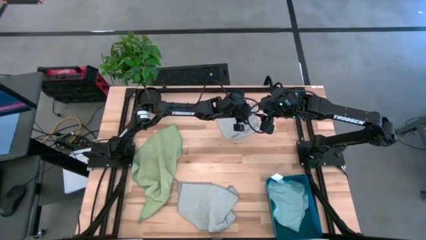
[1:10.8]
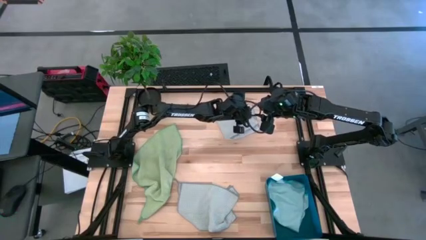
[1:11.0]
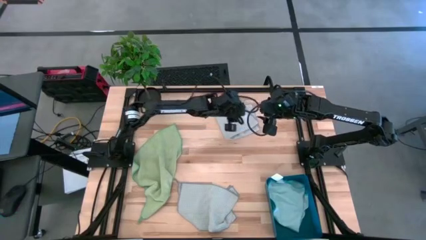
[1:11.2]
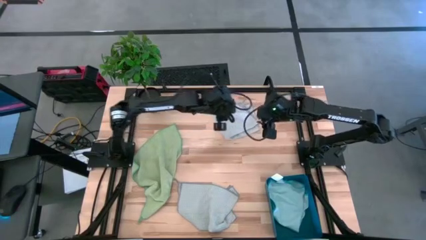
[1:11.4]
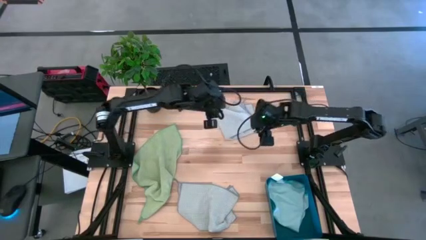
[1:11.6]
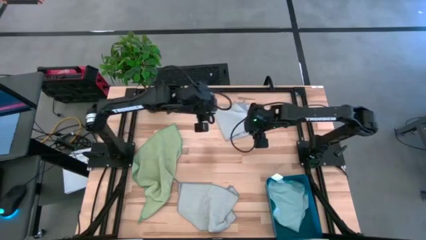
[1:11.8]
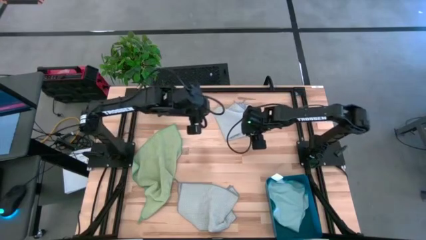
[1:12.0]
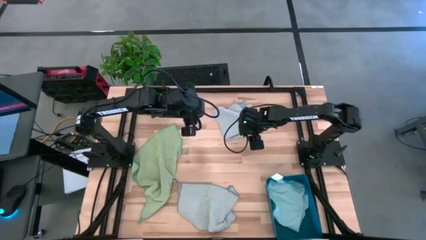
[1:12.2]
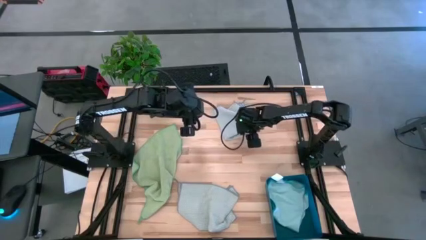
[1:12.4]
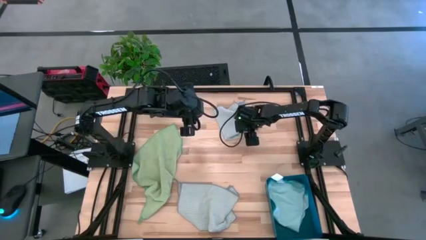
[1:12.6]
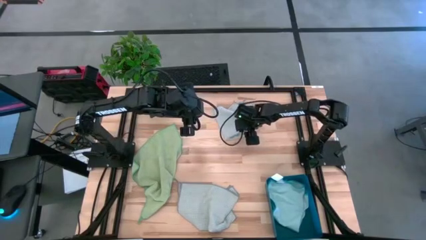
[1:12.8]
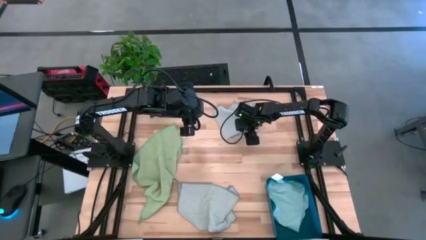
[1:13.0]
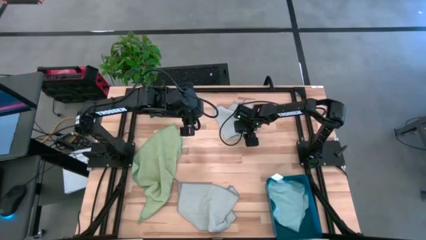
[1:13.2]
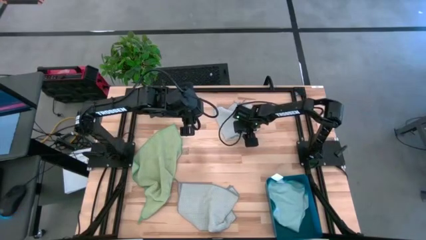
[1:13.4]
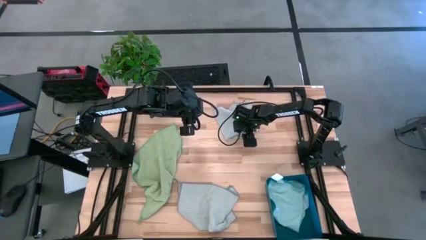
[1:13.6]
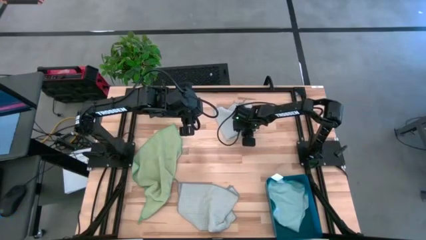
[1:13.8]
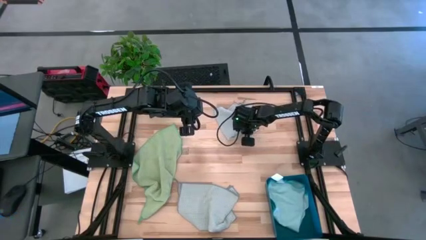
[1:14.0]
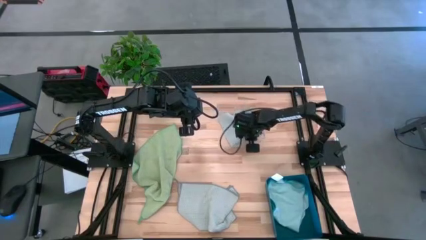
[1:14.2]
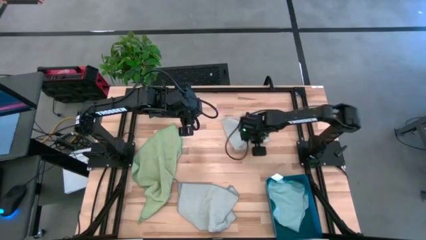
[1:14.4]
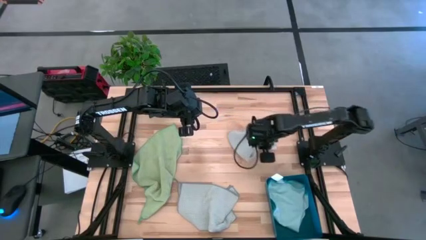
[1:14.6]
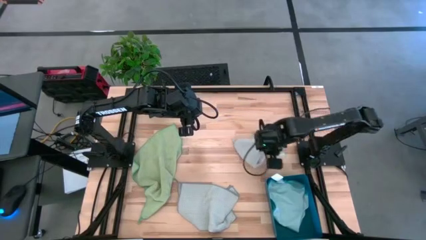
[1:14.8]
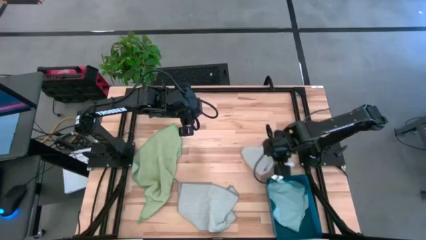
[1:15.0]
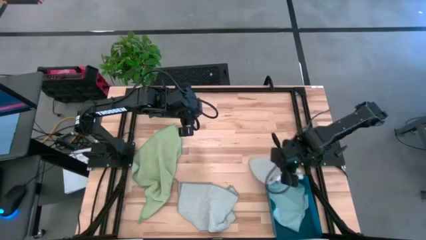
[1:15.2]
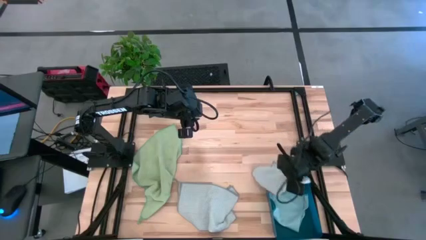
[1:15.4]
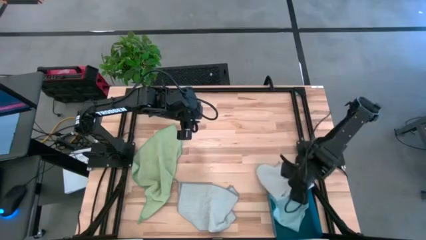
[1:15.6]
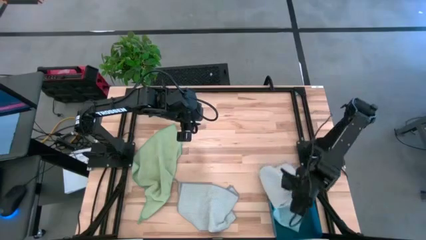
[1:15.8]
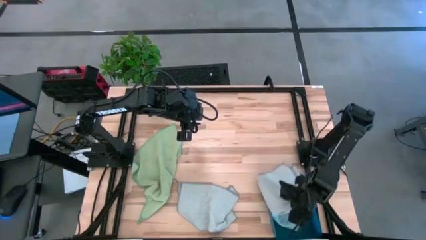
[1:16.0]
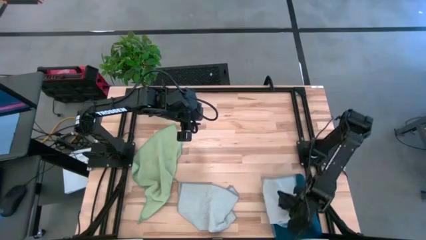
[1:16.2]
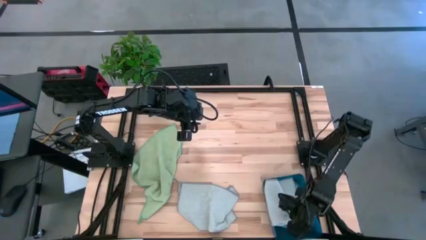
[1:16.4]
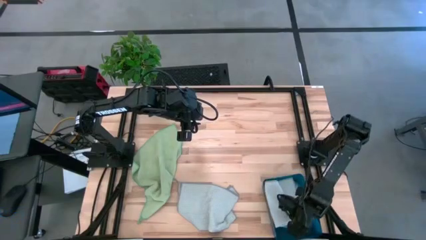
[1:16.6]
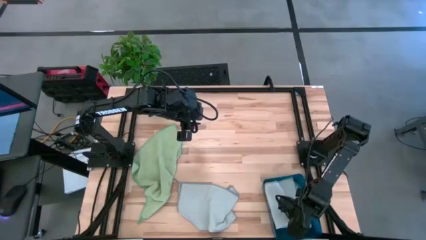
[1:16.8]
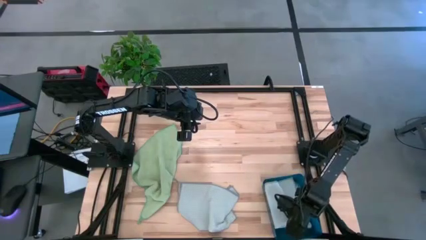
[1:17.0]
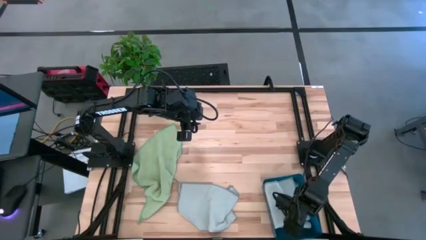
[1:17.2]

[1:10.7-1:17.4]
Task: Fold microfiber towels
Put the top gray microfiber towel into the blue bin

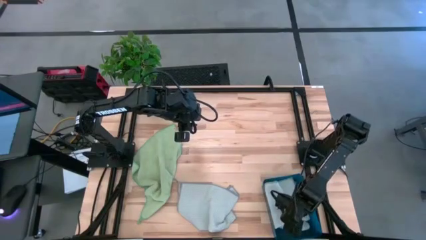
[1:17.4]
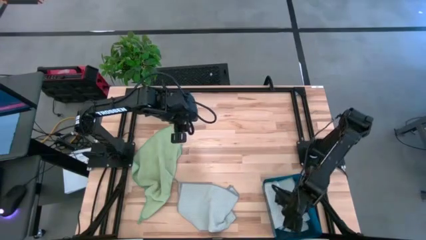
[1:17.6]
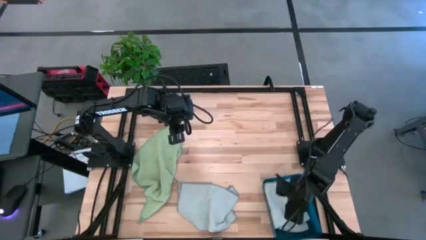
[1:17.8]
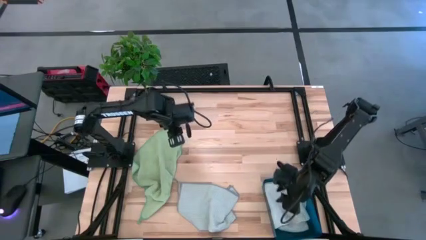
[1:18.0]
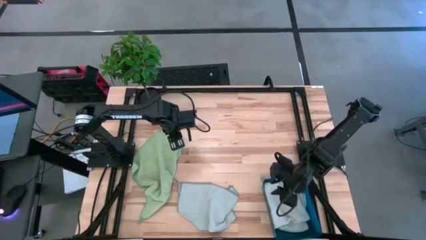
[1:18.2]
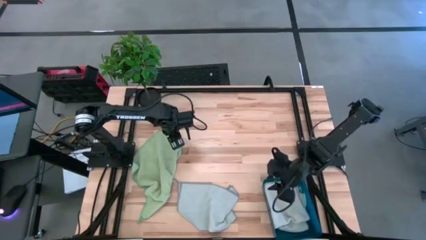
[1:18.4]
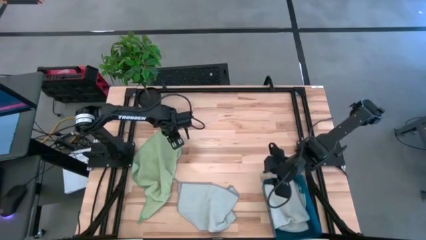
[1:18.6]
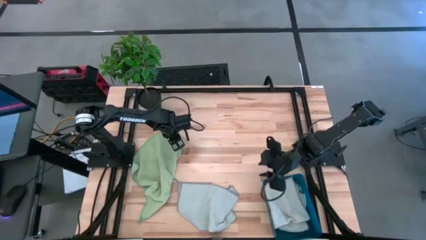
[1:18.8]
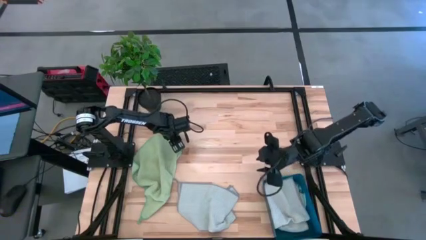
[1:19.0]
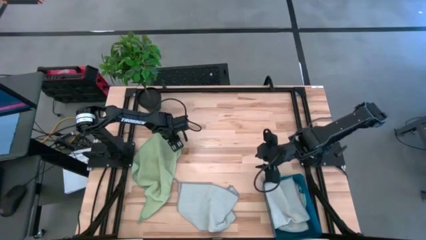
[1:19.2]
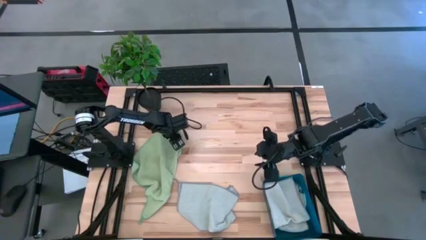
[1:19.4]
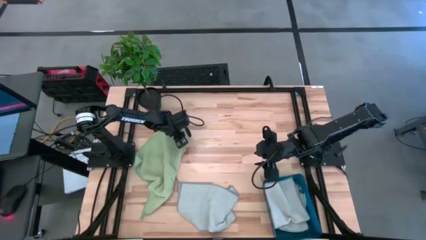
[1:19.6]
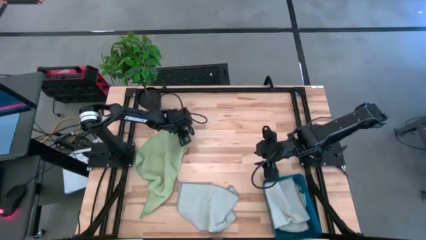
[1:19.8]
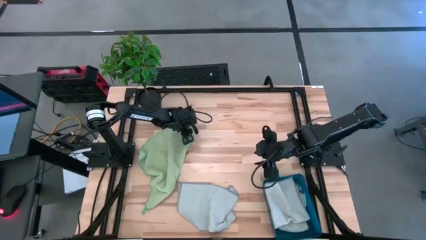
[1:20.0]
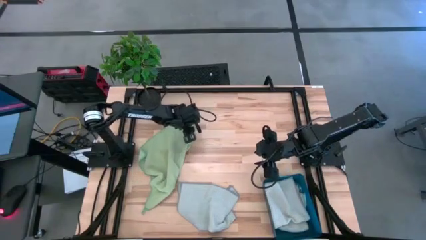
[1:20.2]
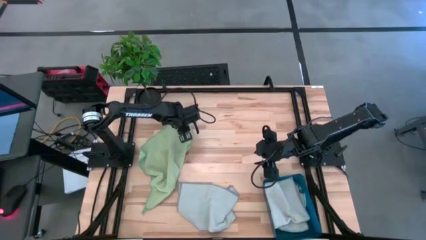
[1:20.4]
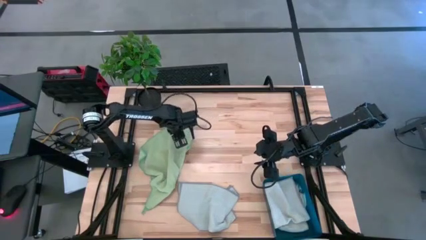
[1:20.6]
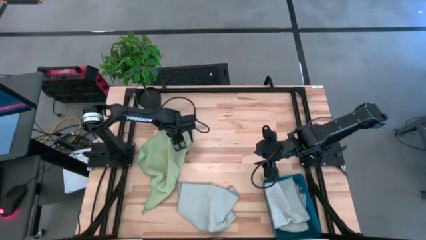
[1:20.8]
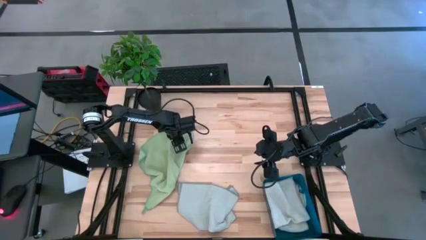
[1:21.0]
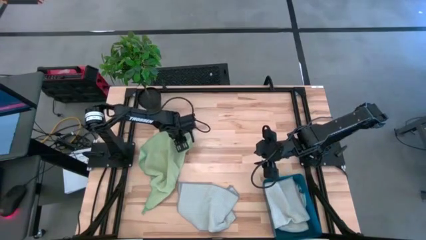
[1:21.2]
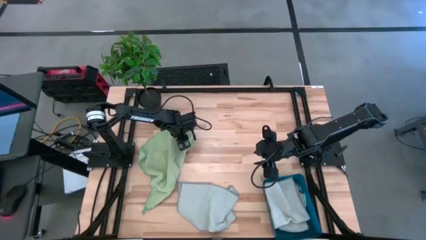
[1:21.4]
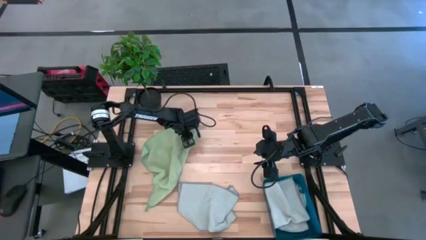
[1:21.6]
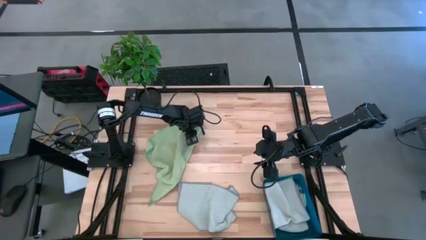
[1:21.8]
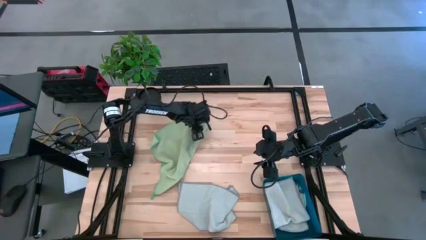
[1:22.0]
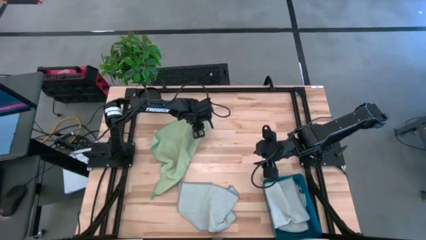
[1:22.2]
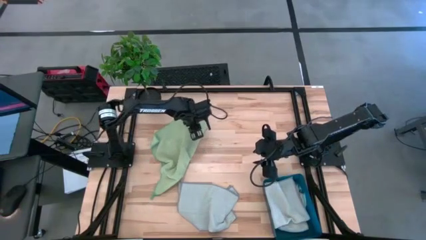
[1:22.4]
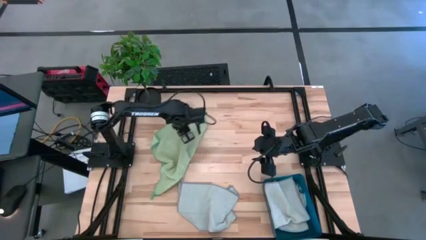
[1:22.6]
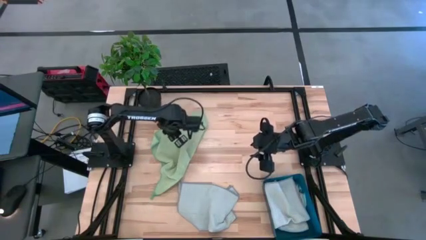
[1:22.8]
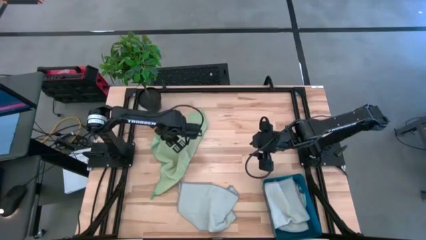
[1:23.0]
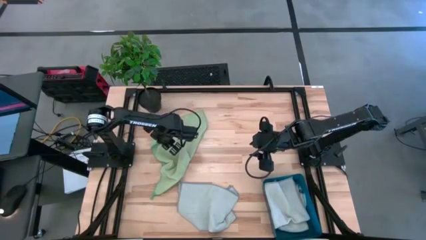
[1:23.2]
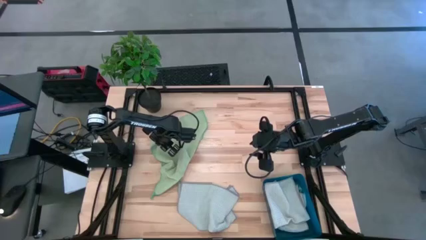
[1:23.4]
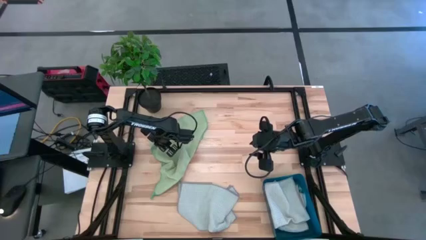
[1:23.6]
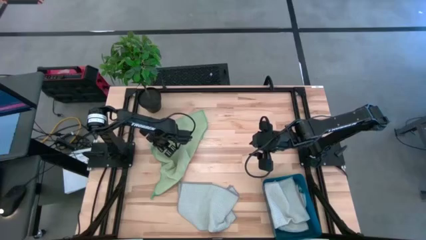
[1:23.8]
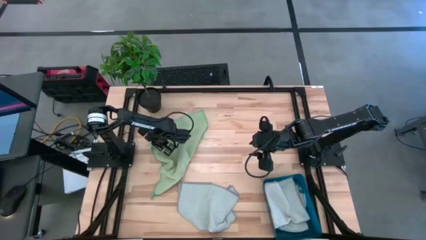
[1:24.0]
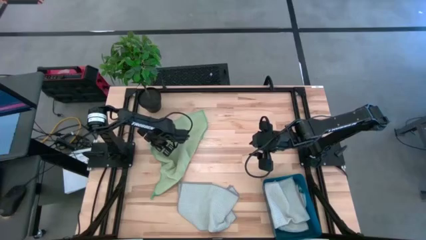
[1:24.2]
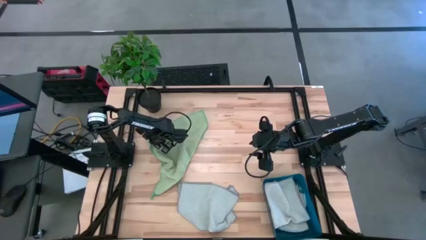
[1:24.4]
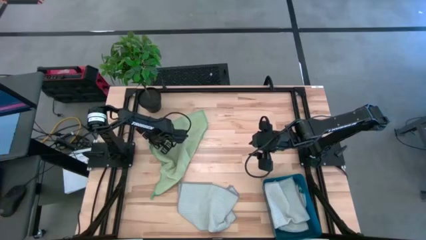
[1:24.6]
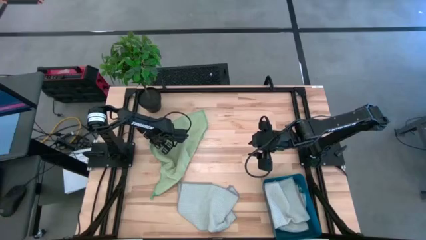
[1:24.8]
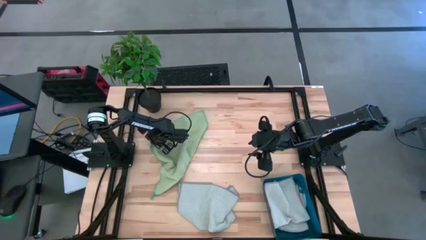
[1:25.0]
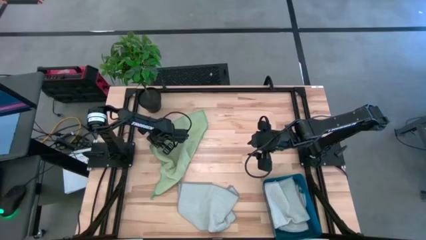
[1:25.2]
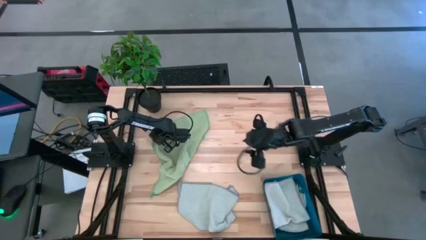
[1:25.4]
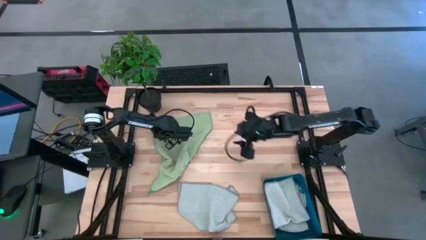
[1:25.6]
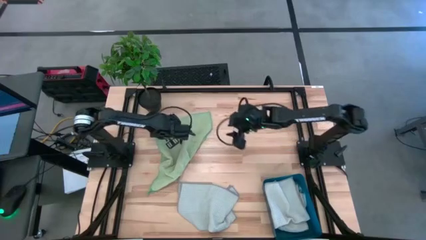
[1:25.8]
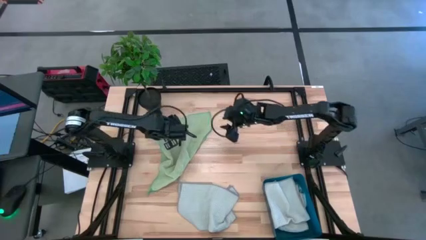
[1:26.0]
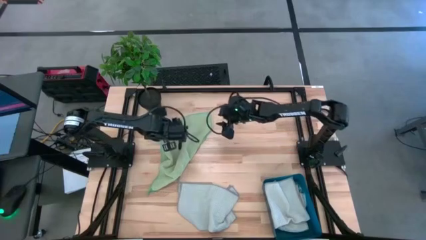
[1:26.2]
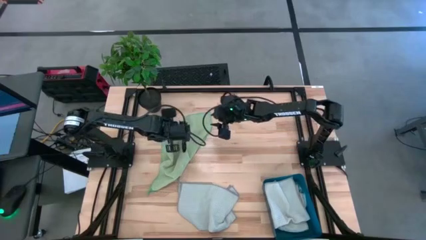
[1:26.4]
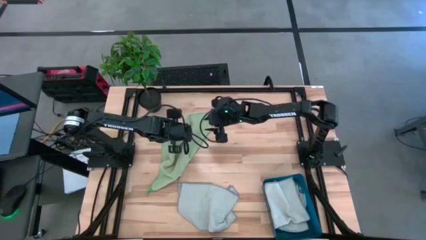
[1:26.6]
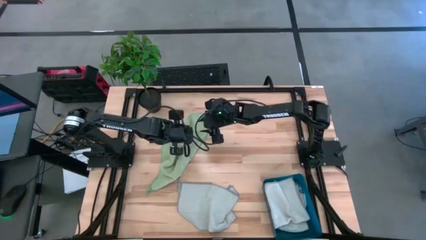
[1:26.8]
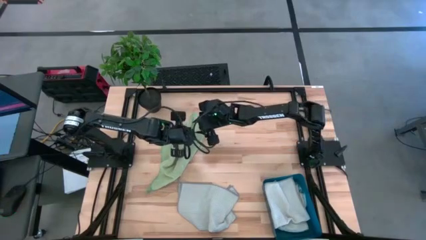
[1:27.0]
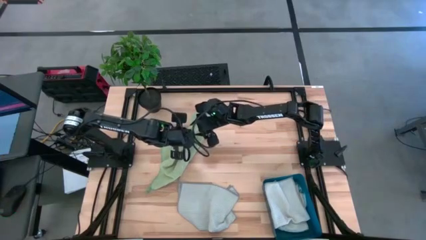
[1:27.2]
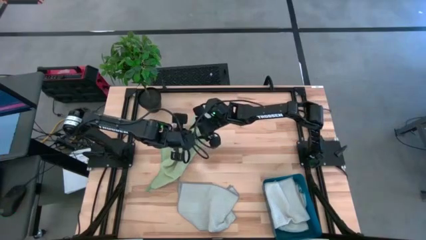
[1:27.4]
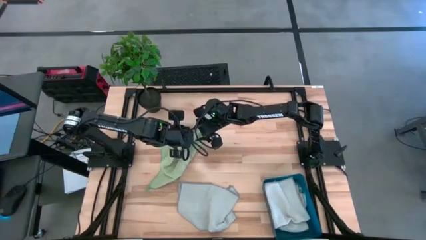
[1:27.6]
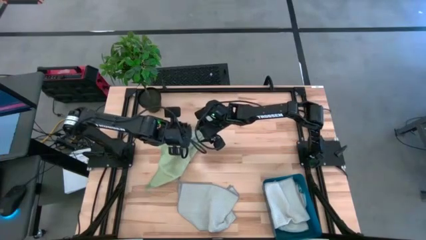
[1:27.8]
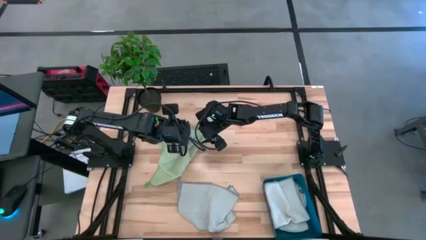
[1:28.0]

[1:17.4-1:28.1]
Fold the green microfiber towel
